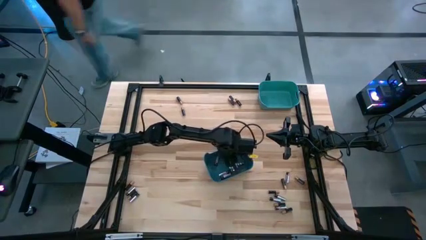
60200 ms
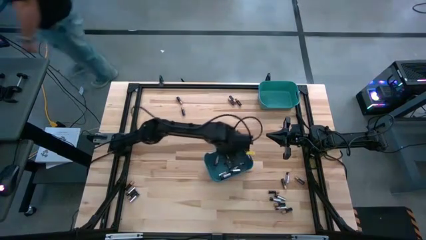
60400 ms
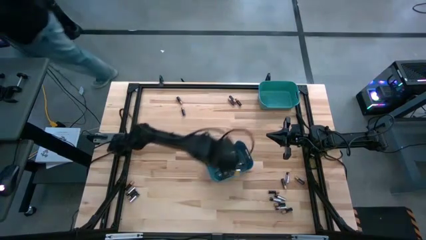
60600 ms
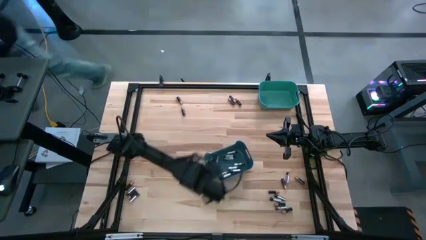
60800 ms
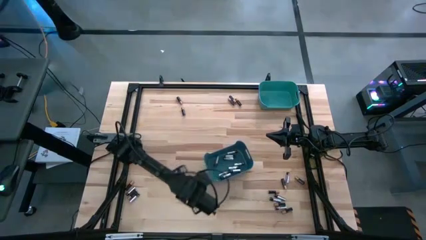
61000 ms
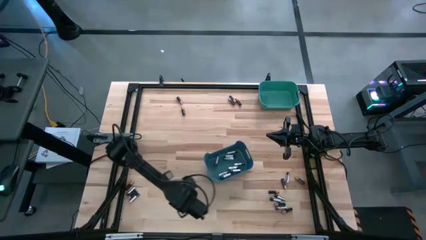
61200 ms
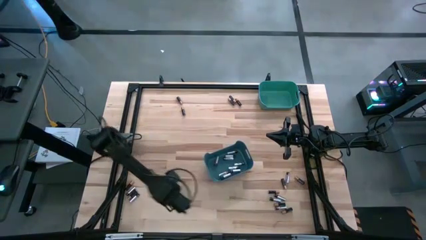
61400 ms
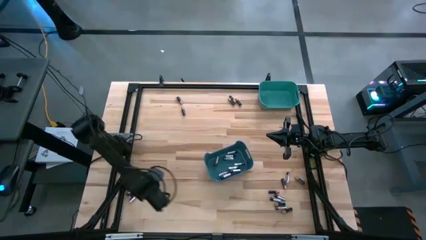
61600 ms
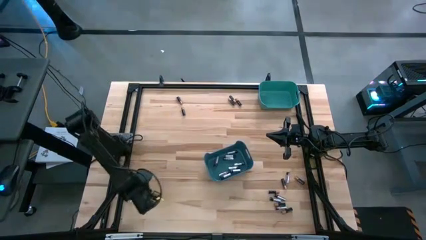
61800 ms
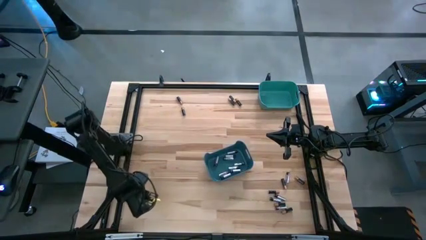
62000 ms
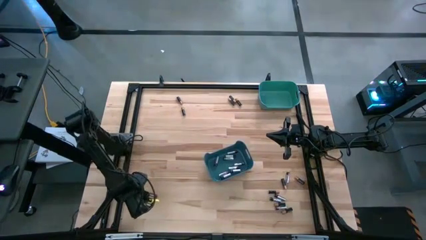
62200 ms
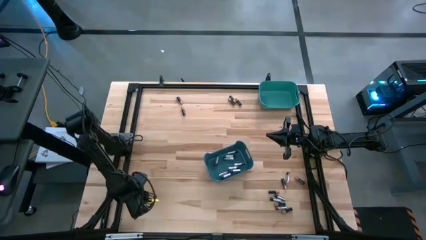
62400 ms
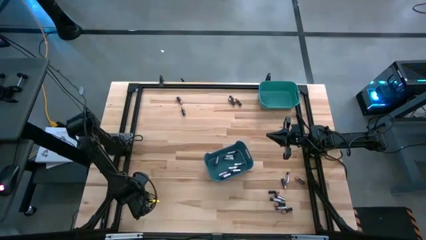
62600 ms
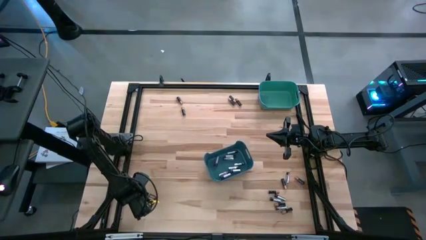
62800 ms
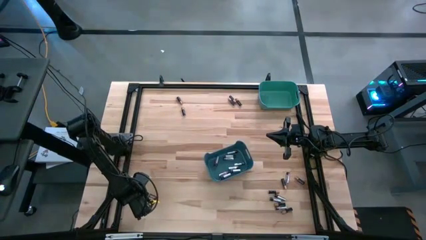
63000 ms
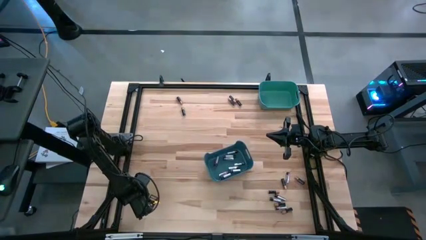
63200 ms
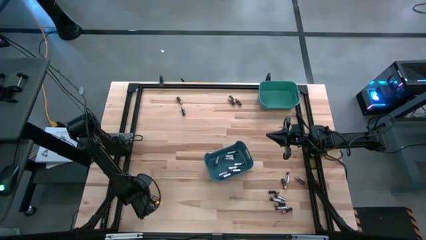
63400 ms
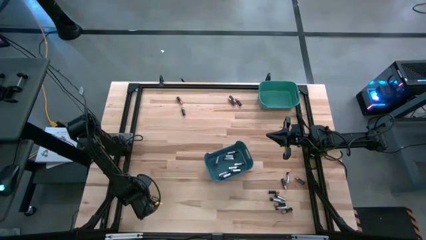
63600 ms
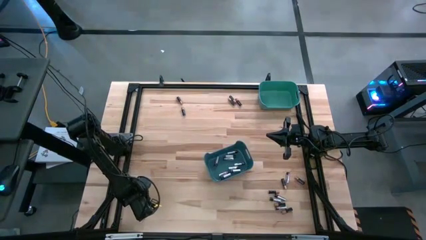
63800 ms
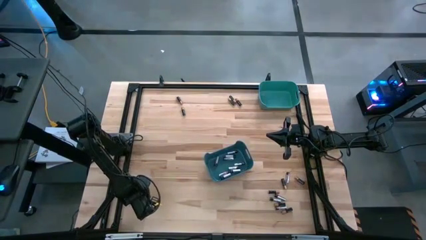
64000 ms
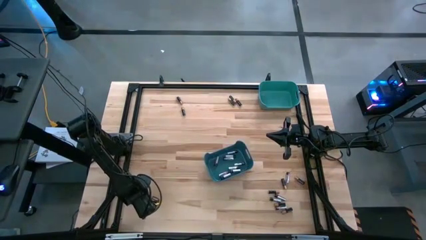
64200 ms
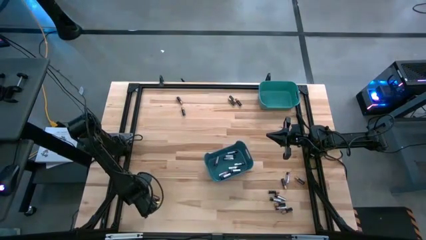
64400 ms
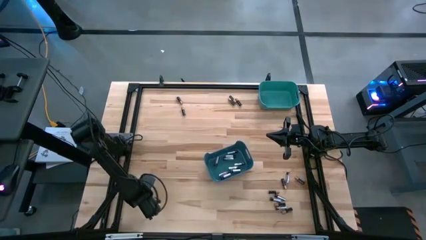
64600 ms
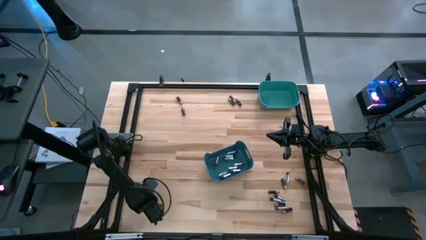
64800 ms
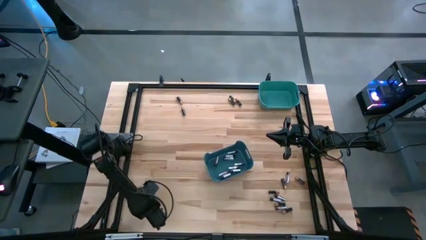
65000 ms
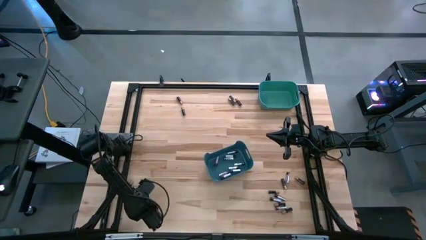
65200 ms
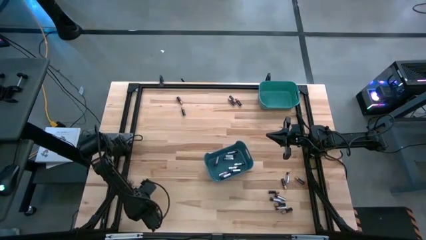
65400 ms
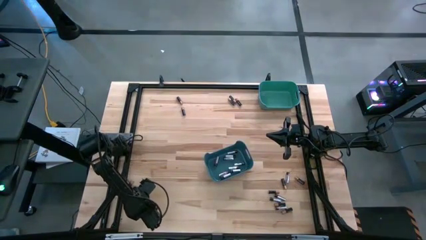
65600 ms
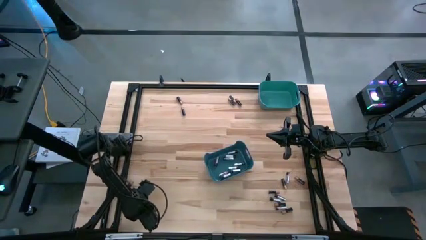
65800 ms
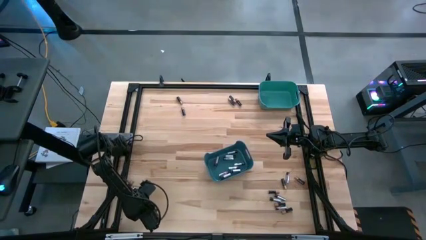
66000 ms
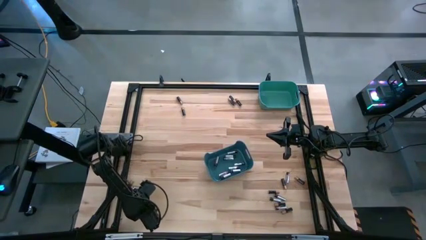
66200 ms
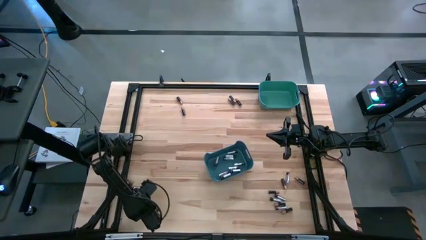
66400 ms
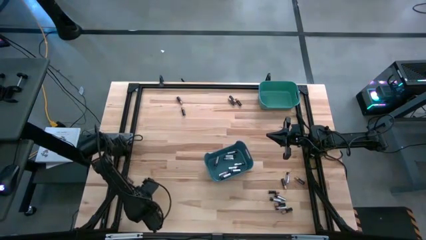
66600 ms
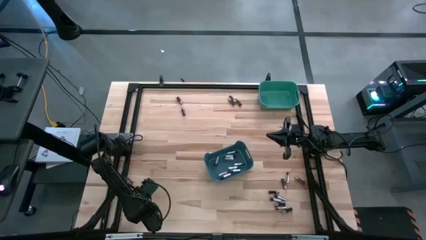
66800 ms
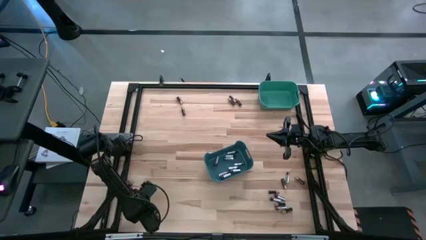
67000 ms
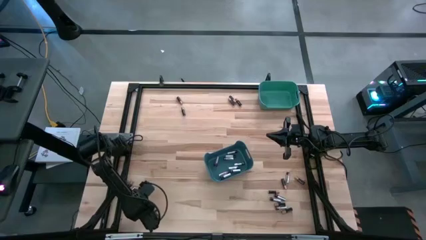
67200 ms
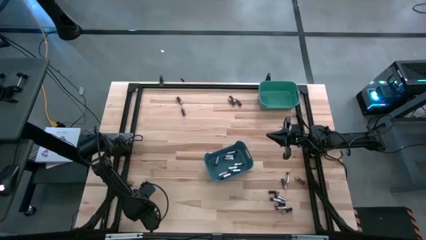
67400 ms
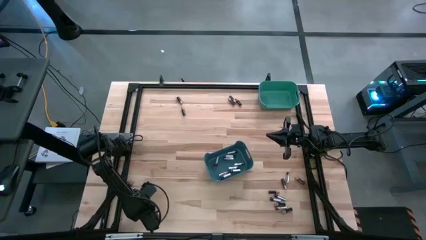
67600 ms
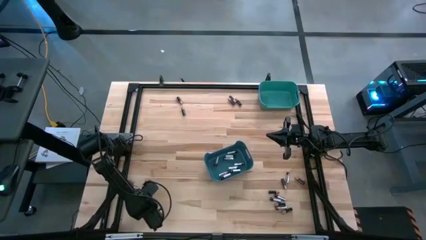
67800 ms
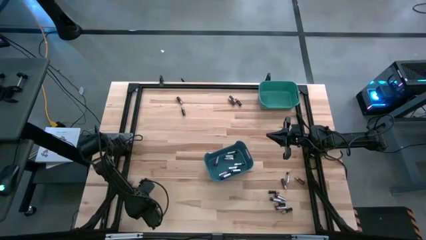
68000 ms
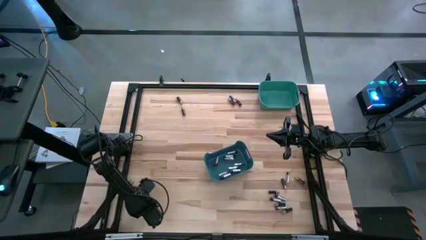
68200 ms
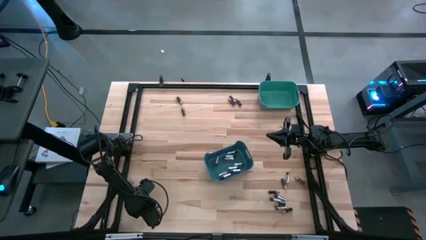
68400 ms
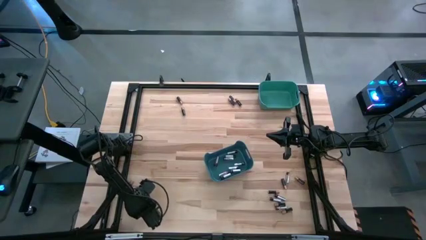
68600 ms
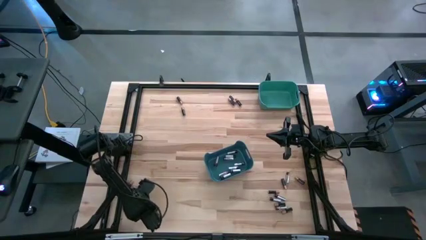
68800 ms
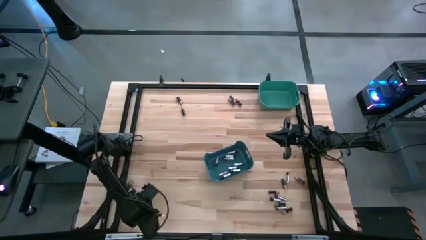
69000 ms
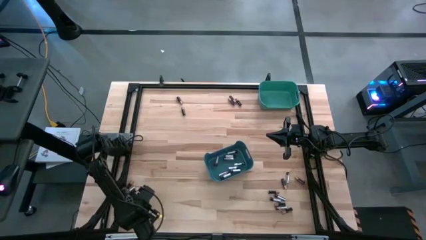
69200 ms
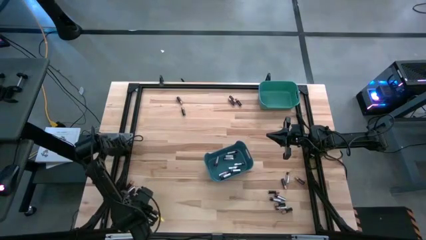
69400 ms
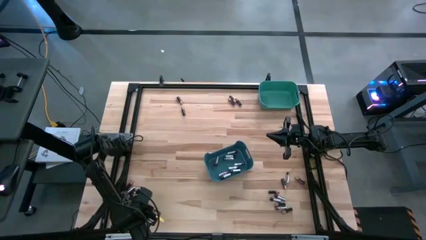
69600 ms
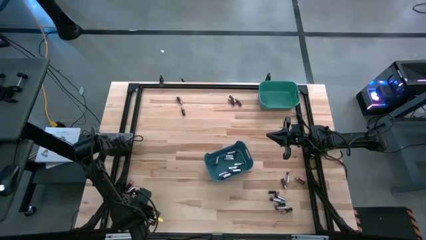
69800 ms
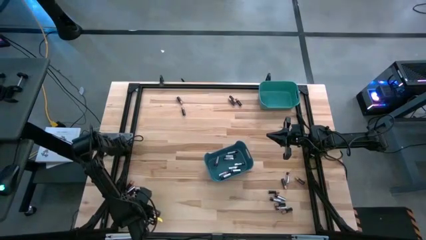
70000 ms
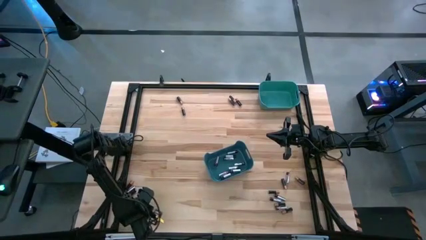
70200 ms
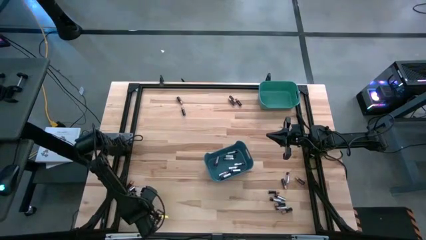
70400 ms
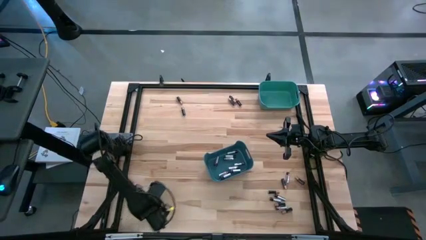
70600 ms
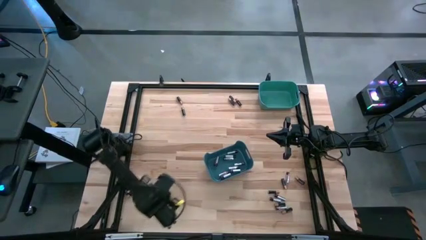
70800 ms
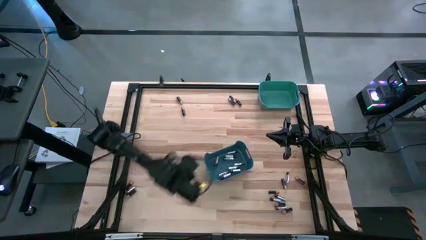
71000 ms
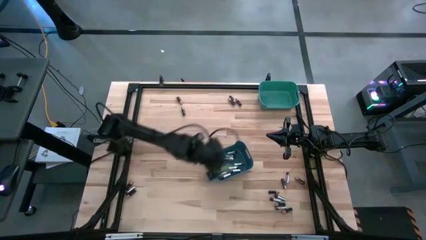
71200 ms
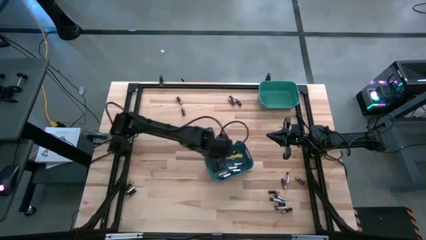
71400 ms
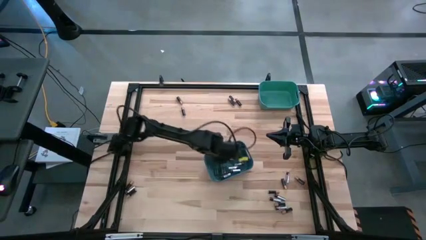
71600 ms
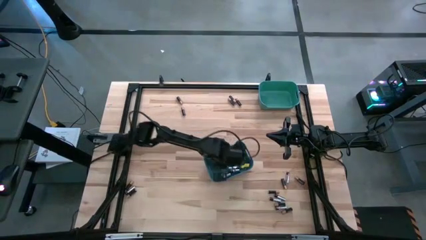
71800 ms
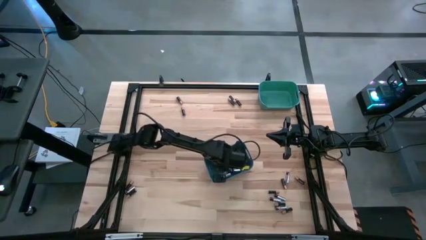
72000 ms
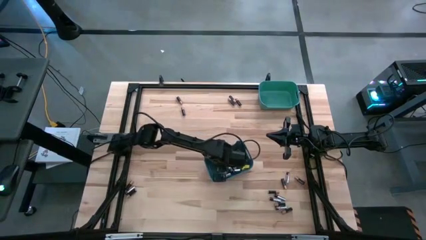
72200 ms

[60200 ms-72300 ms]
Task: Sort batteries
Put the silver battery into the blue bin

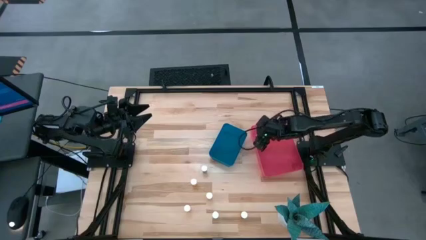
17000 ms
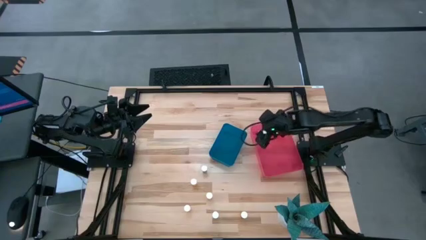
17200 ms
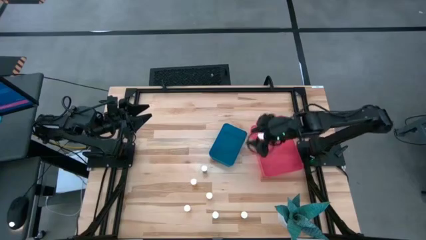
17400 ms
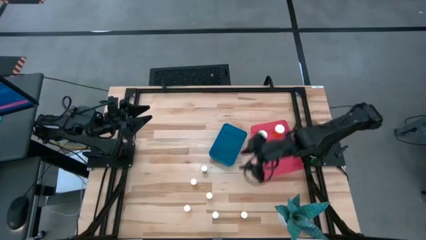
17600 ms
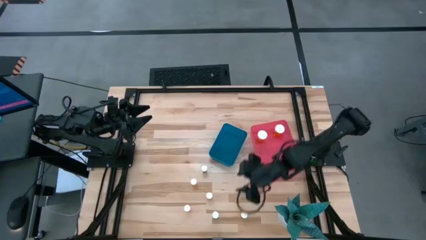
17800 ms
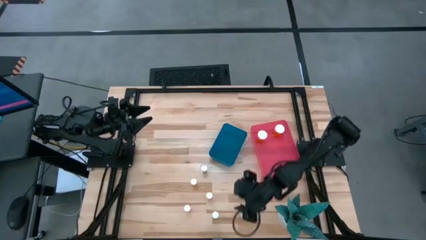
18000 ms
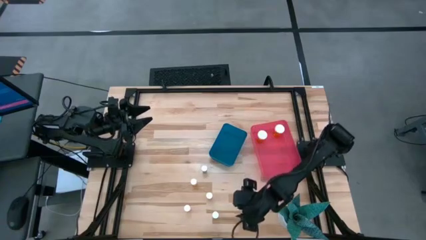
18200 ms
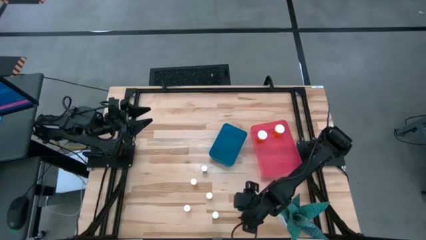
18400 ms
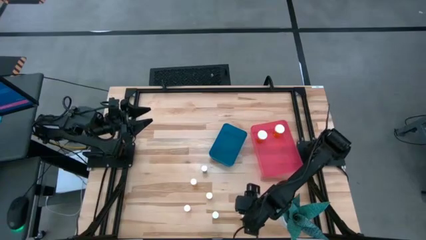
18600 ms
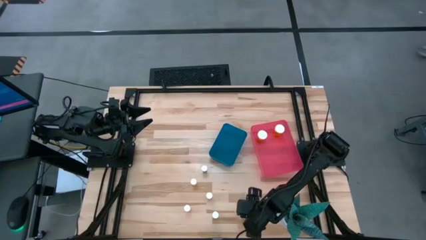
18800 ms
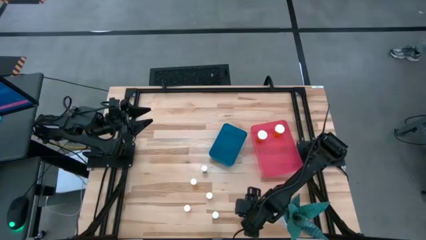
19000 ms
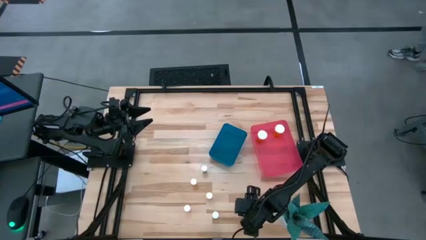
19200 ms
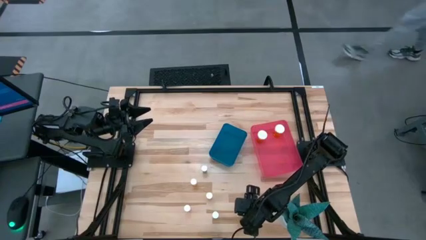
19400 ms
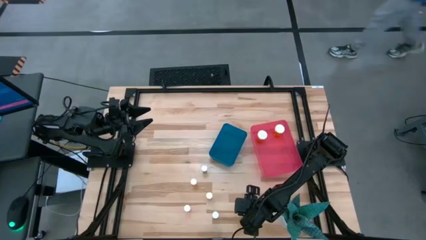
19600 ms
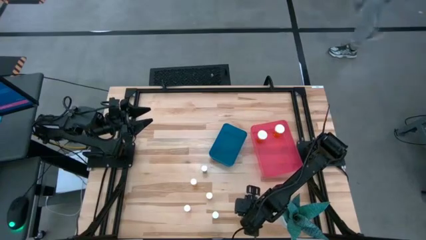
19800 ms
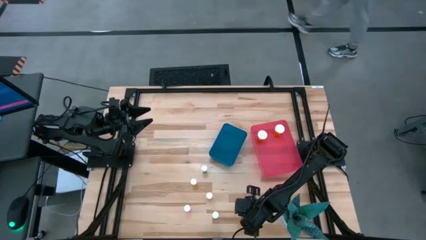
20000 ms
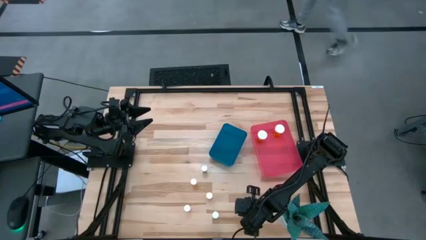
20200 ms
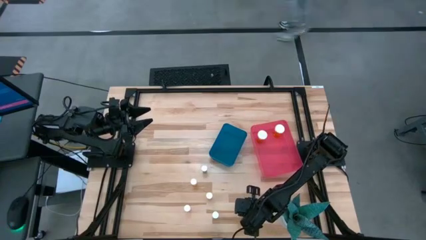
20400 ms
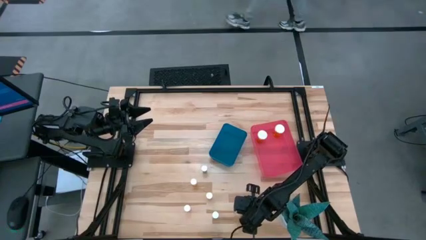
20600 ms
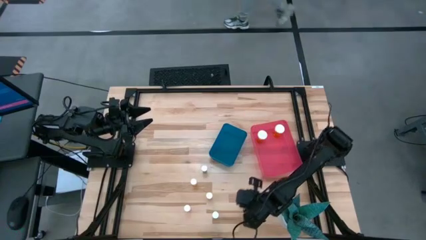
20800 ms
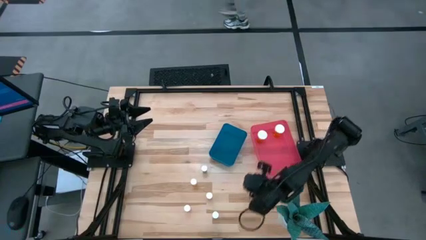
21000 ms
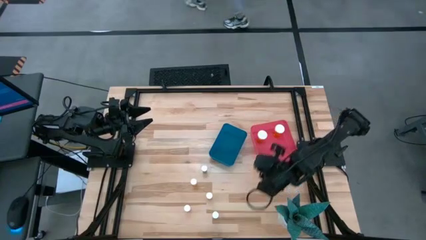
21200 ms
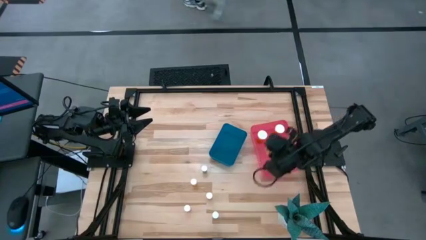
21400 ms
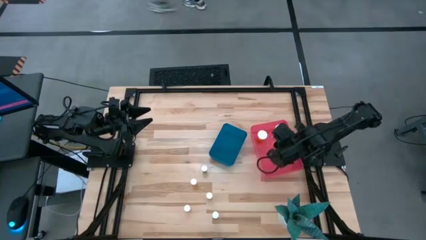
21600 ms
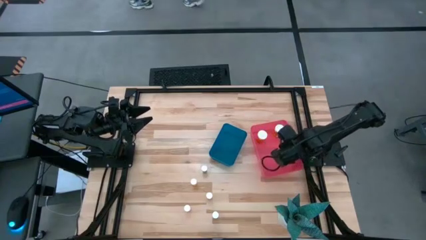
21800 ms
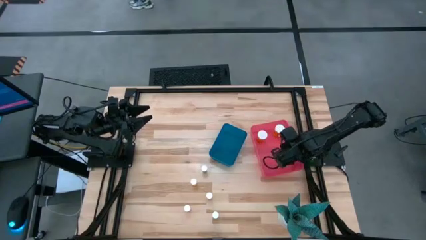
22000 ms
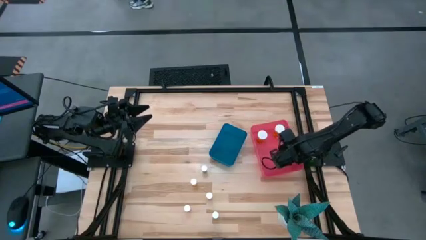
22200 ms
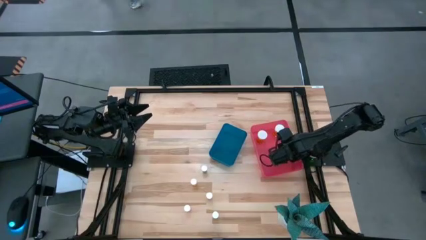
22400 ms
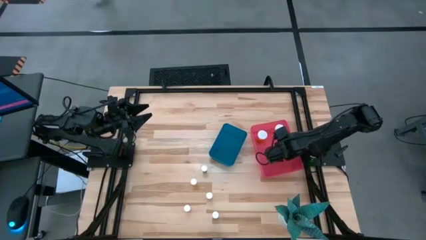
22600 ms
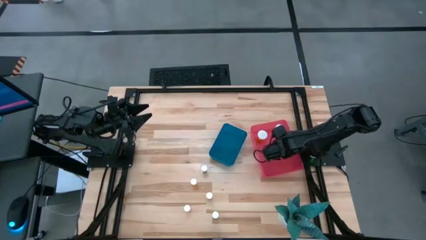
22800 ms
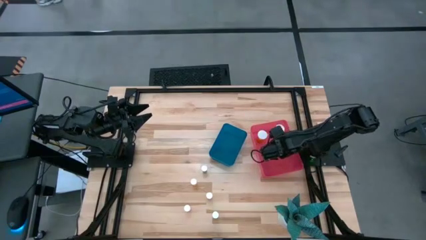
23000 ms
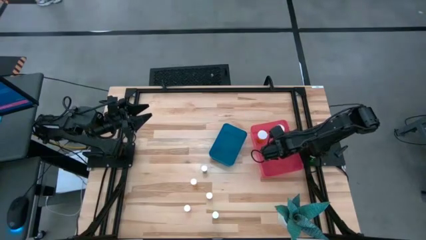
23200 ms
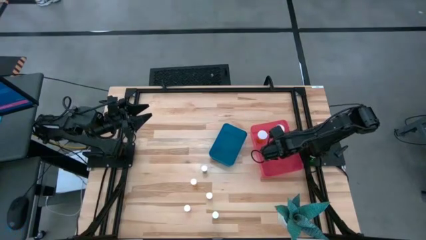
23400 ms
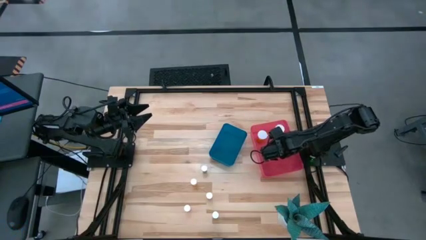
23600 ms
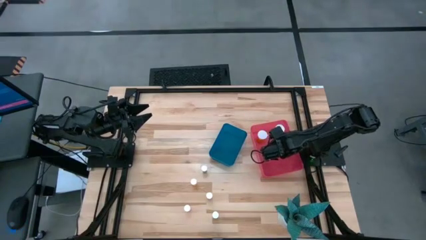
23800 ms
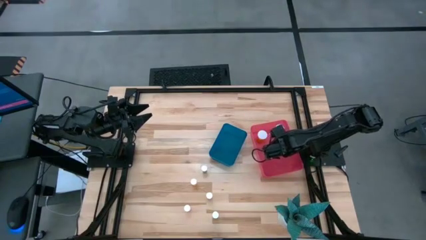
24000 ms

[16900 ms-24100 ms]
Task: Pick and place medicine bottles into bin by pill shape (circle, oval)
Put the orange capsule bottle into the pink bin
